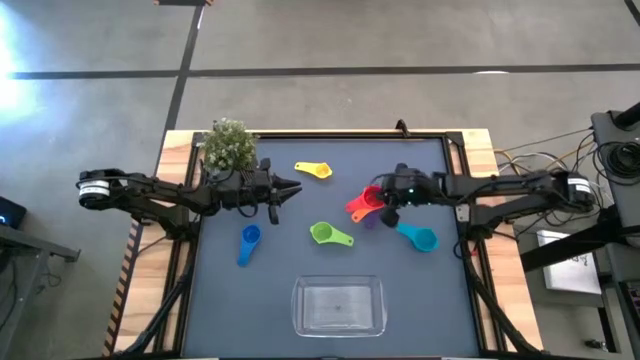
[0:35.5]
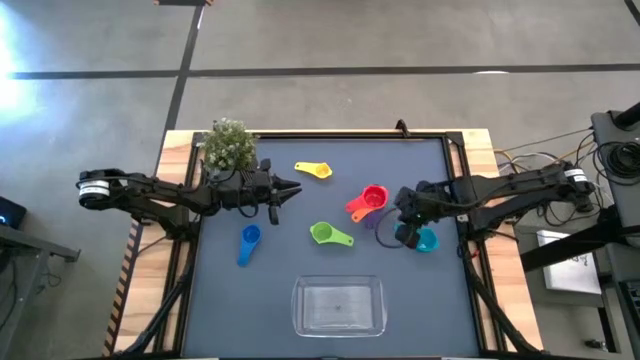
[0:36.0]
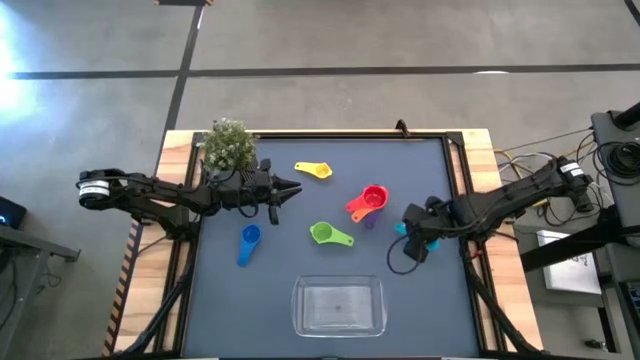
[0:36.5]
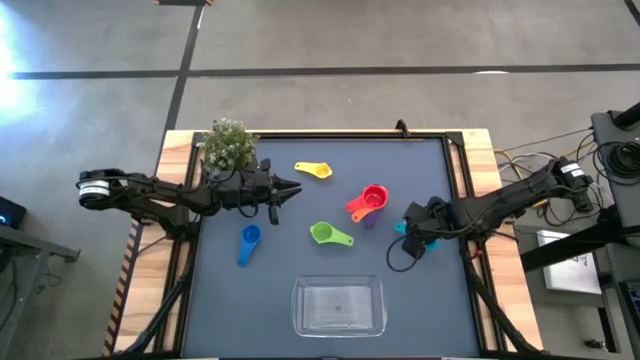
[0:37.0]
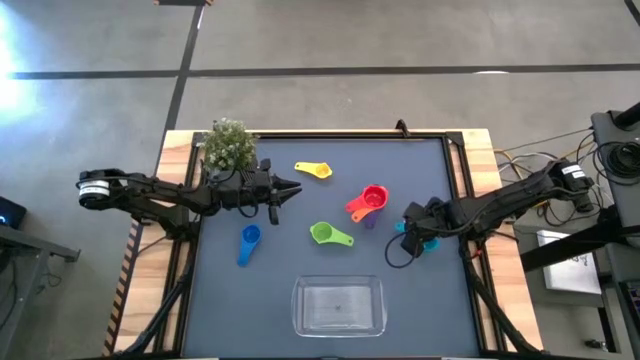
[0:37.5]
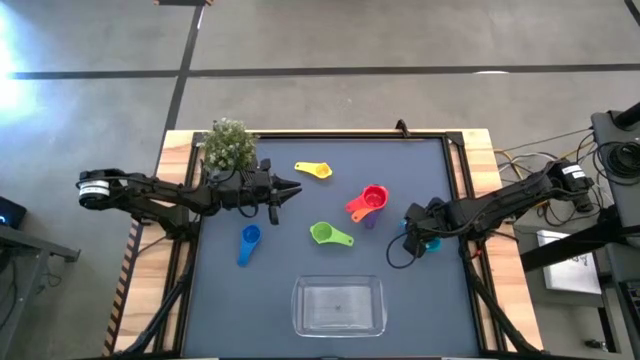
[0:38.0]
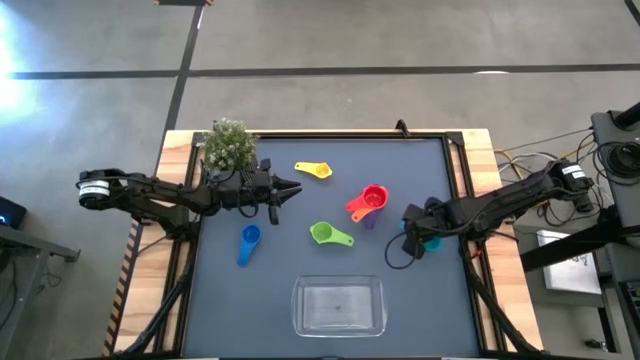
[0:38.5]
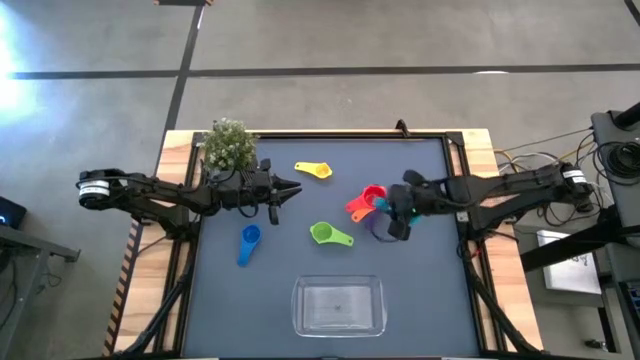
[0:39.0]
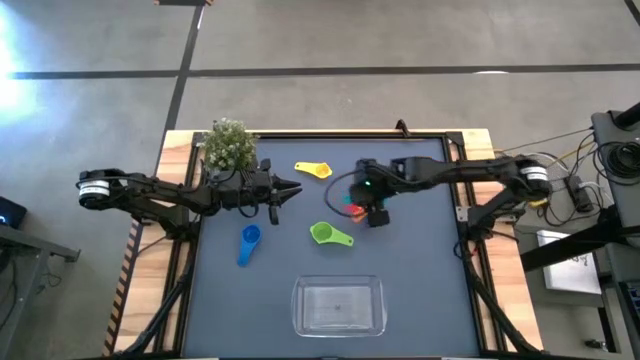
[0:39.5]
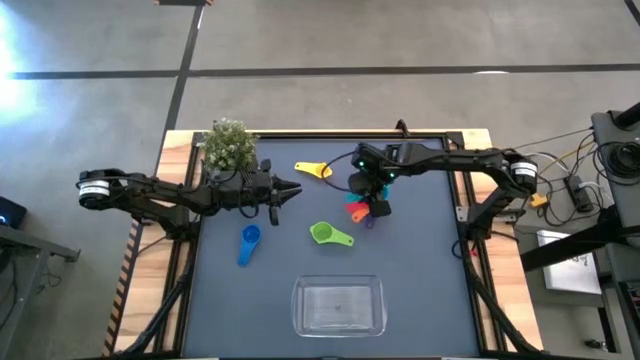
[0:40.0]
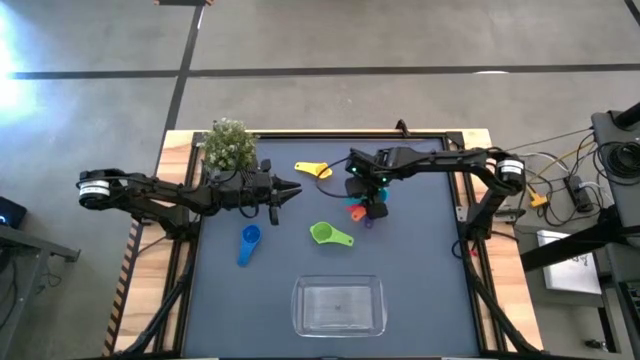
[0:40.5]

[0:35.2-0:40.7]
Task: Nest measuring cups in basket
Stack the light blue measuring cup on the red measuring cup

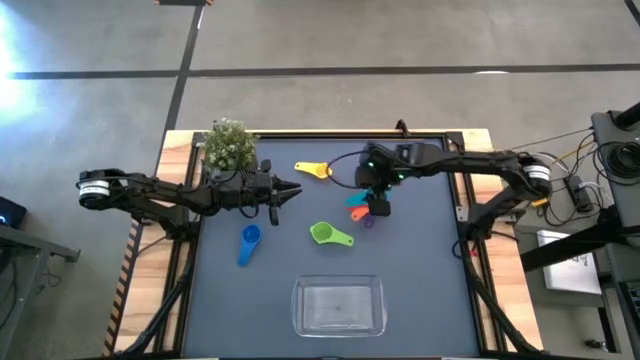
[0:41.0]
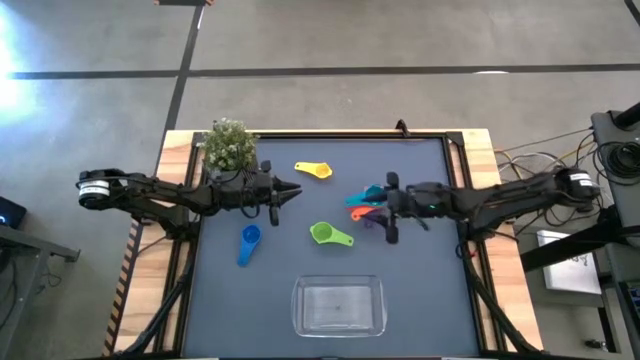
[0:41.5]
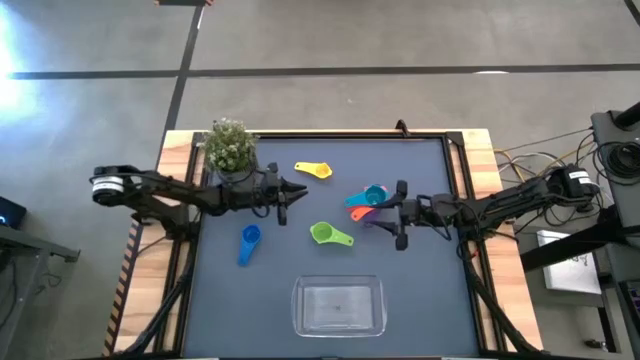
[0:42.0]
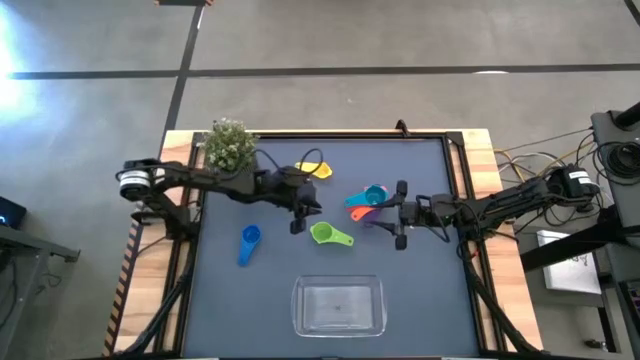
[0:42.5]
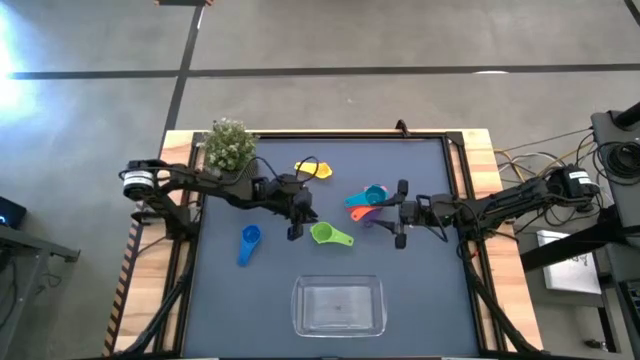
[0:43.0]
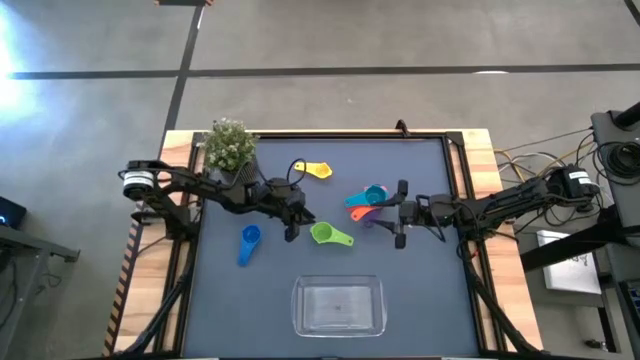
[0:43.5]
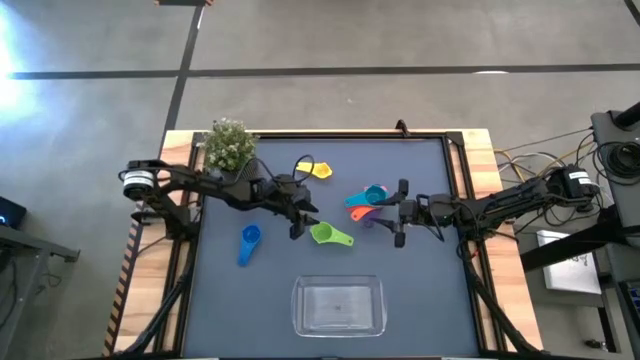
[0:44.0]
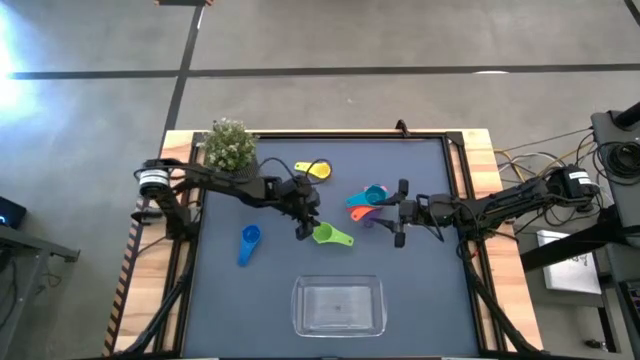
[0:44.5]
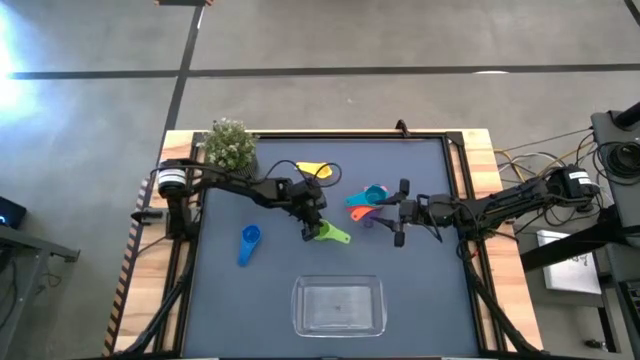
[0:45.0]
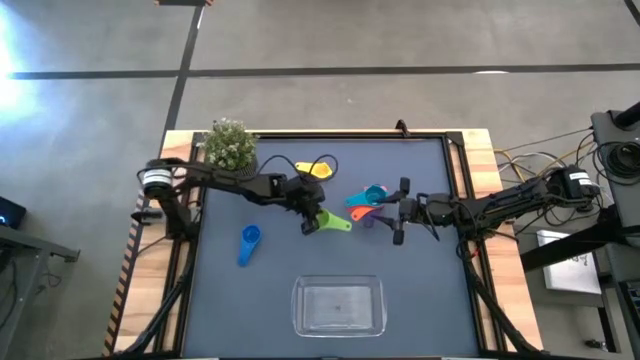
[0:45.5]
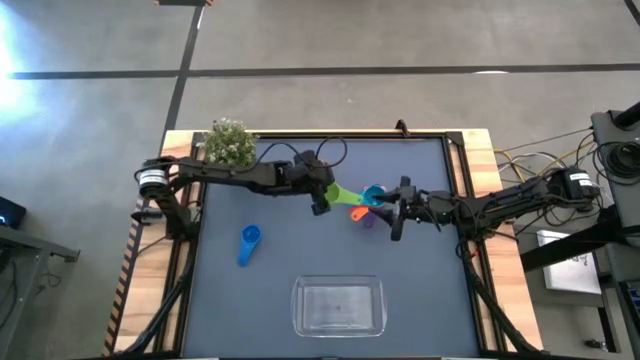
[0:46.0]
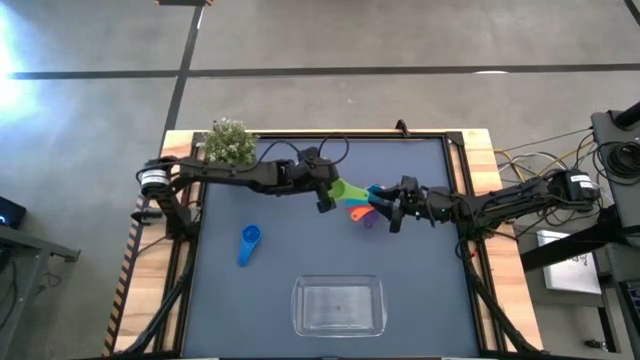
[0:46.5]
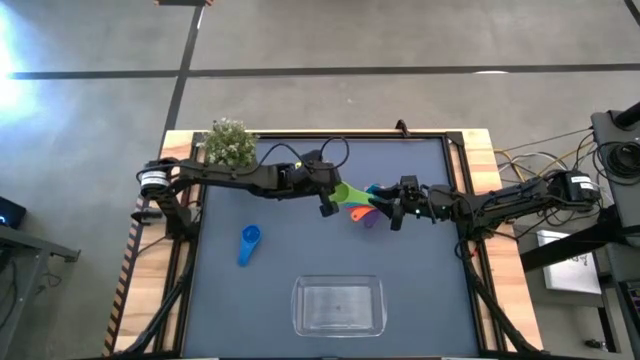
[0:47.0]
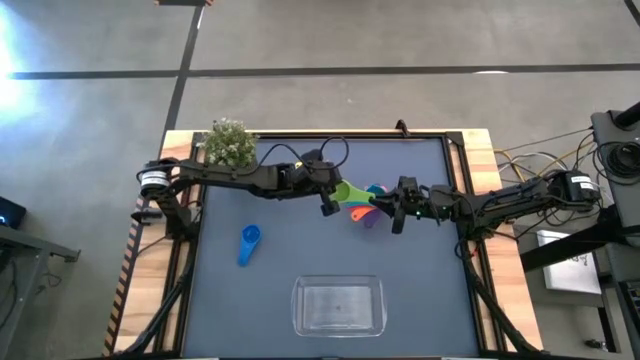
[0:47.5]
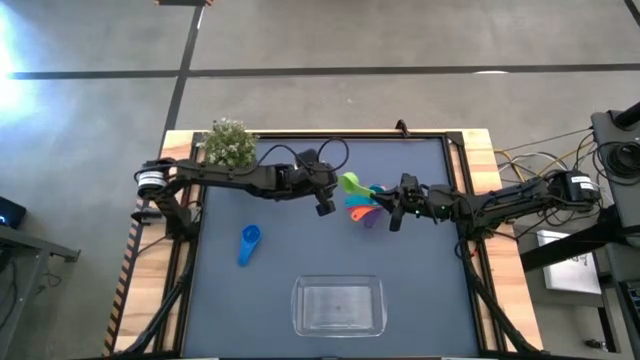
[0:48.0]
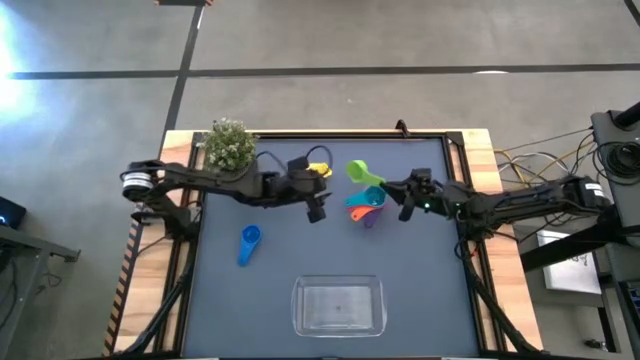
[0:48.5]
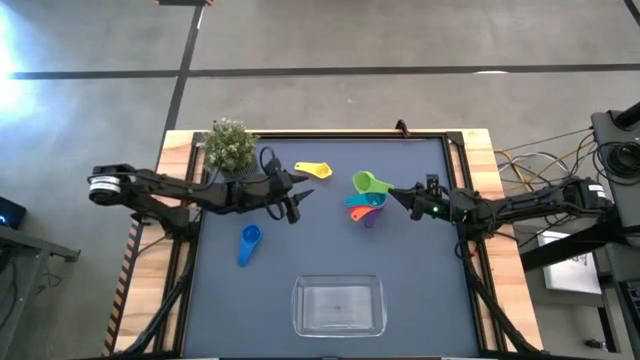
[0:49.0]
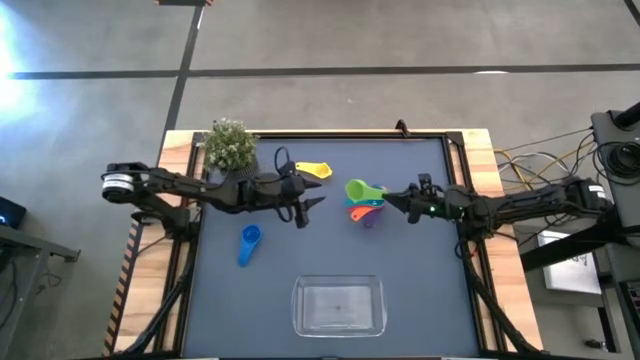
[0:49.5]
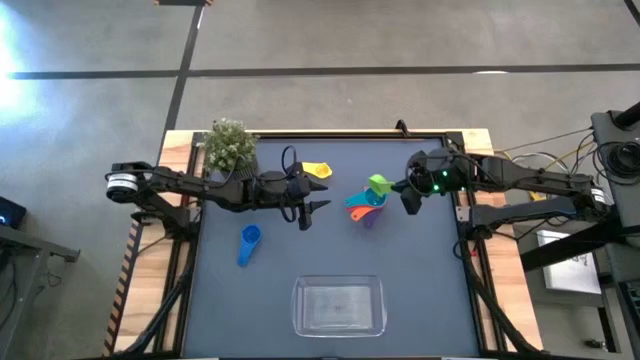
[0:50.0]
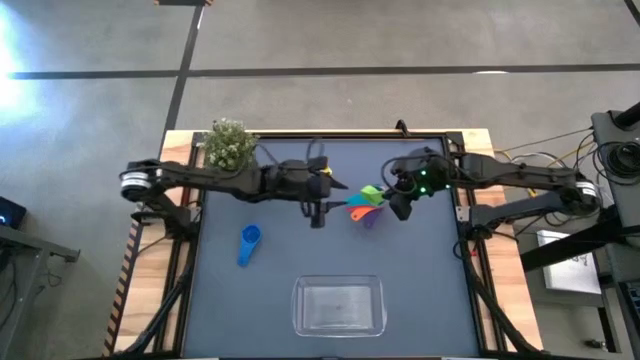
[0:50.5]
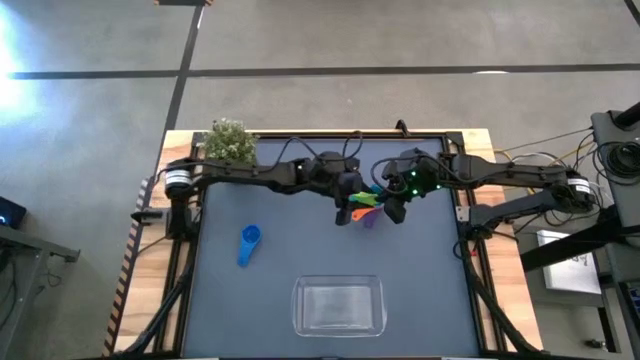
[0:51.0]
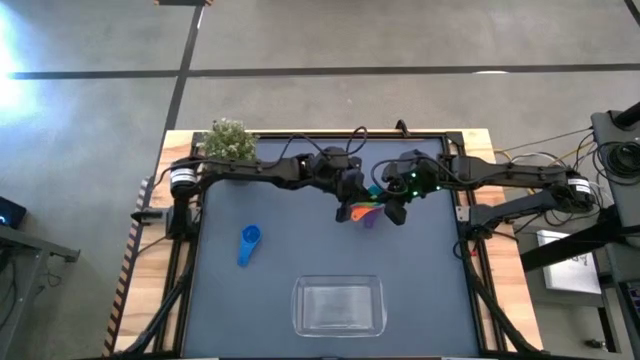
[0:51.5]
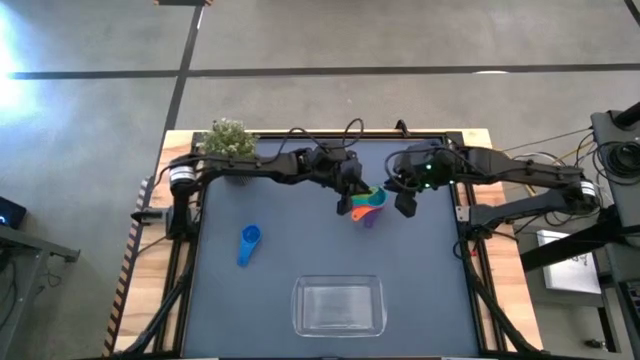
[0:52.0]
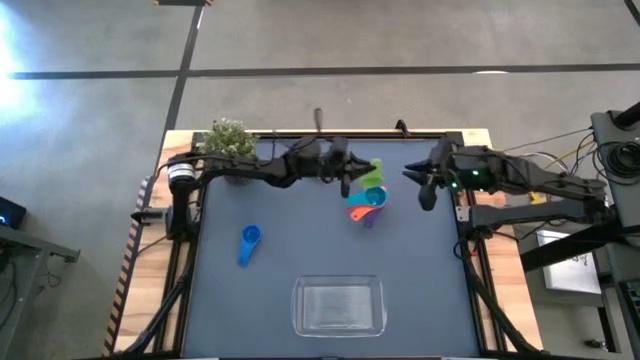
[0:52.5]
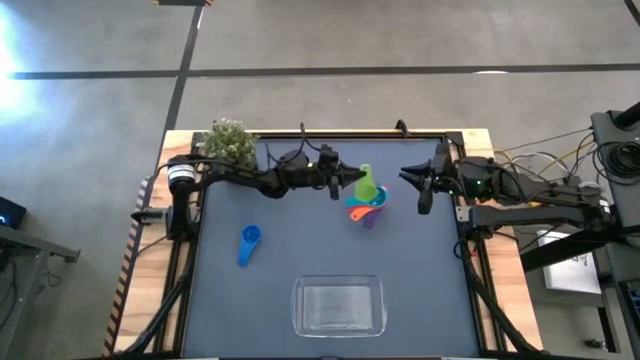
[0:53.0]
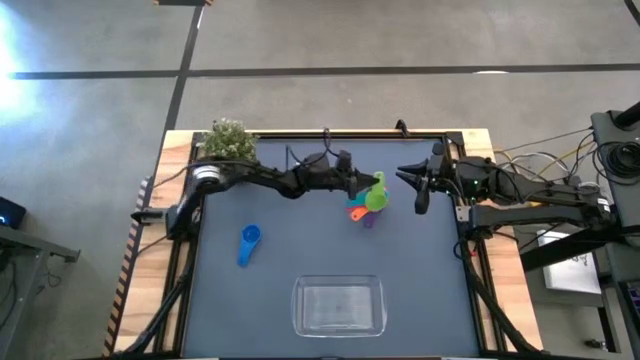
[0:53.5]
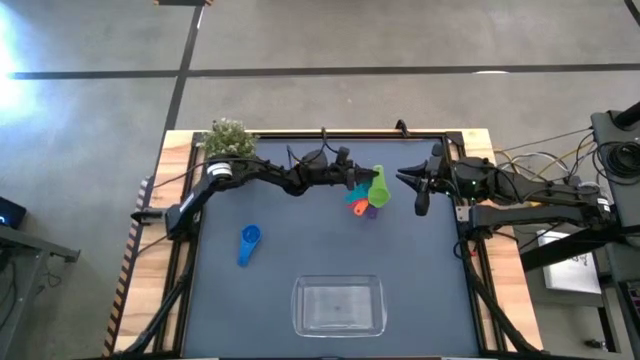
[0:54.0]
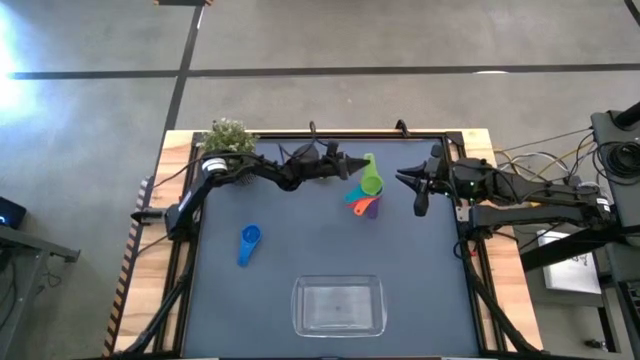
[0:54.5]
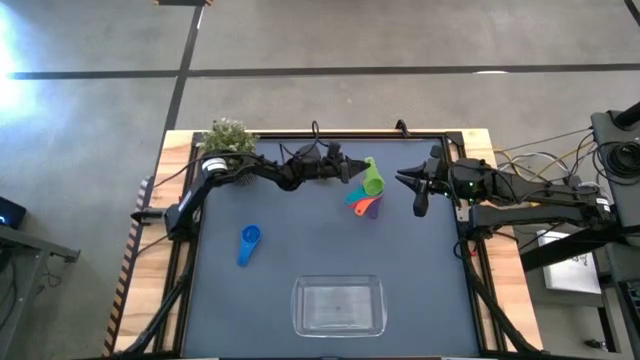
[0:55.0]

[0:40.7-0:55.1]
Stack the green measuring cup on the light blue measuring cup

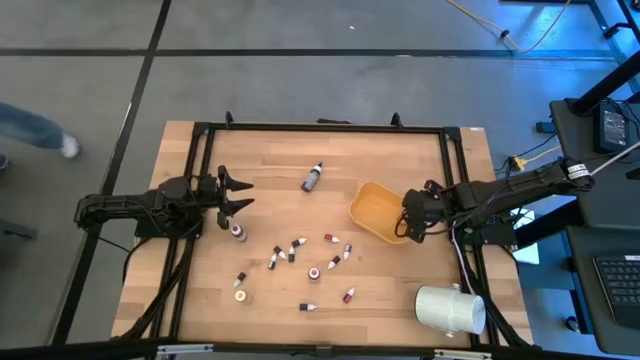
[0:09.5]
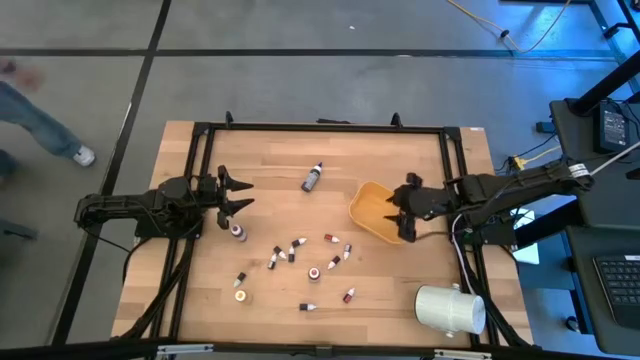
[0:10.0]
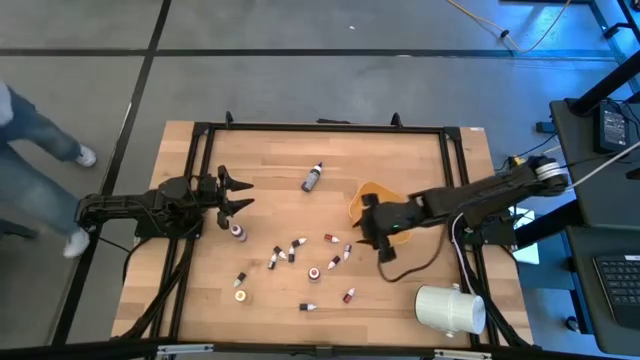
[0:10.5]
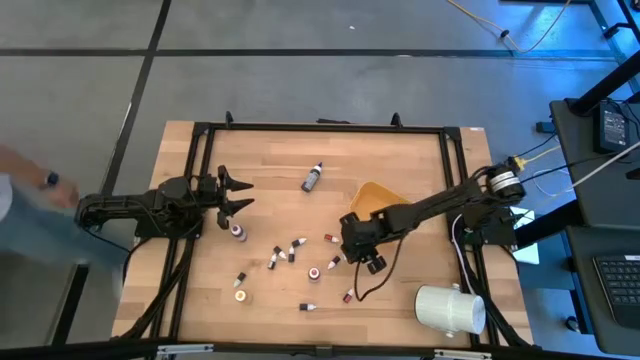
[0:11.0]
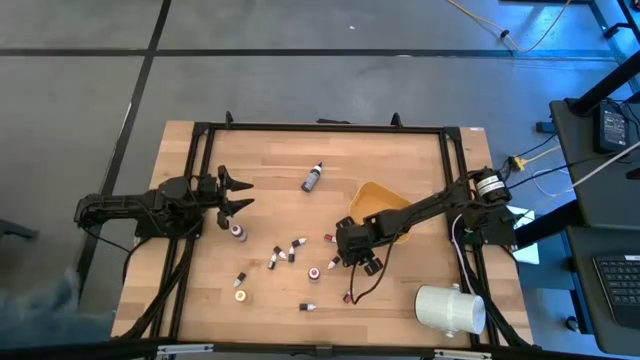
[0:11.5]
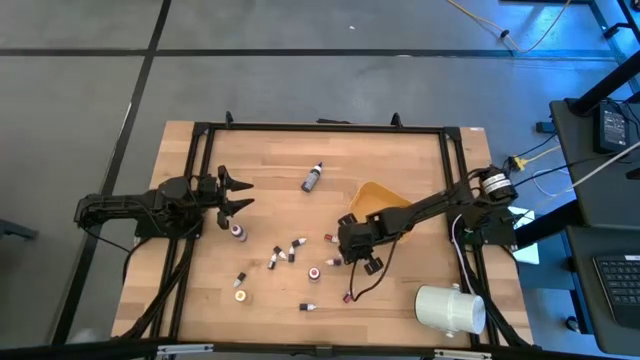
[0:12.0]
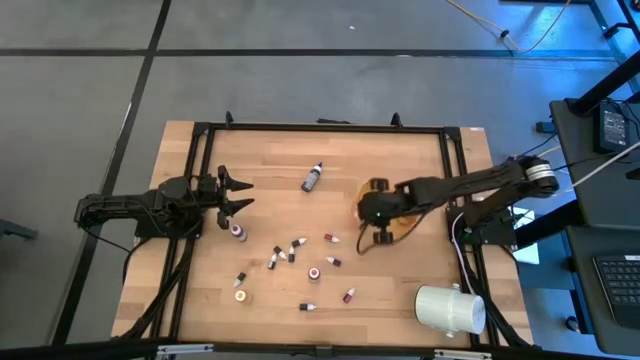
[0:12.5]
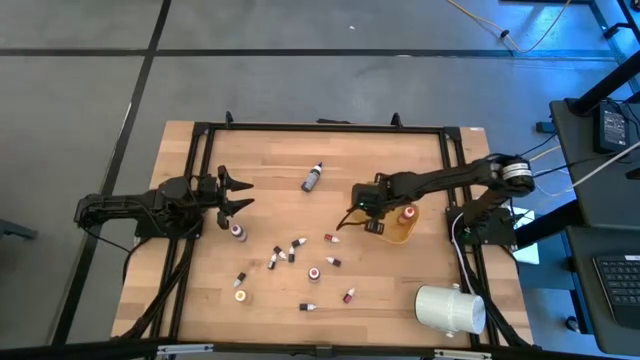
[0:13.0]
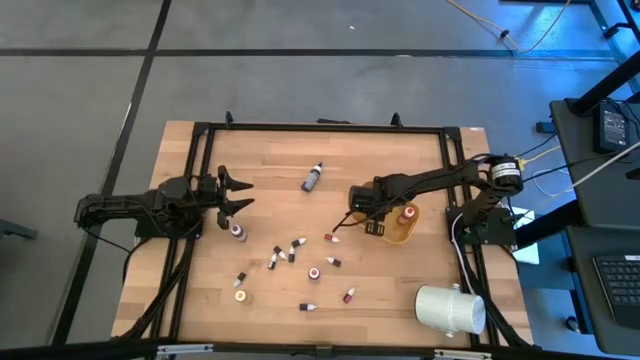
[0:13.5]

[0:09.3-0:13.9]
Task: Pick & Place food coloring
Put the small purple food coloring bottle in the yellow bin
